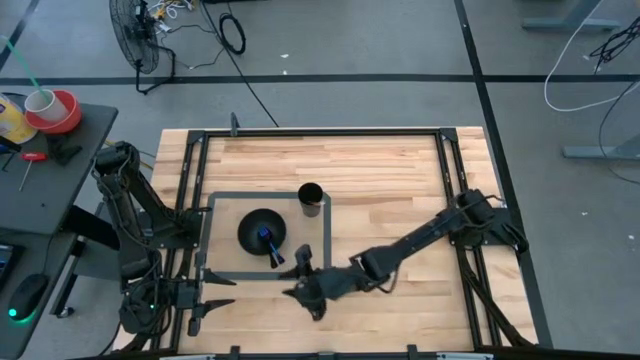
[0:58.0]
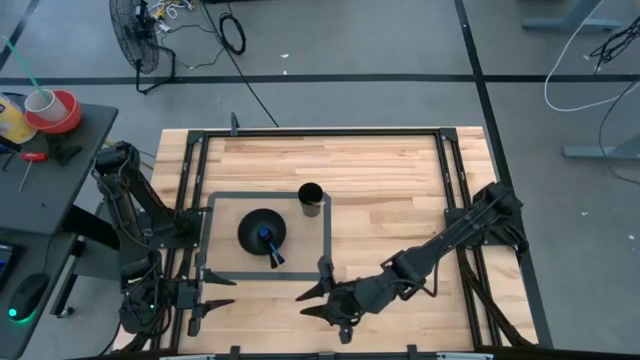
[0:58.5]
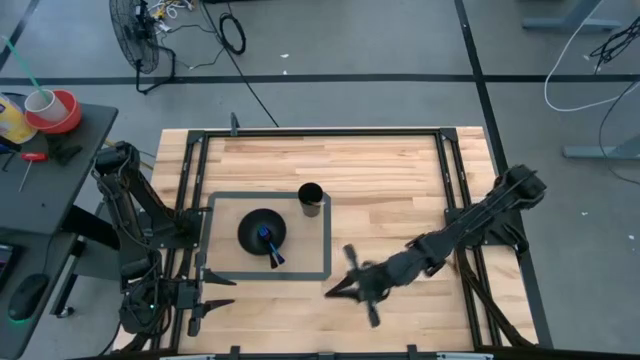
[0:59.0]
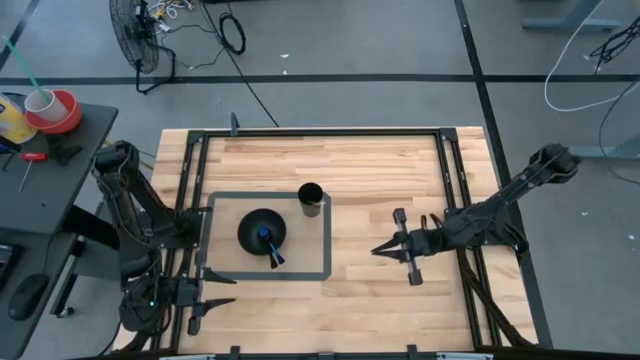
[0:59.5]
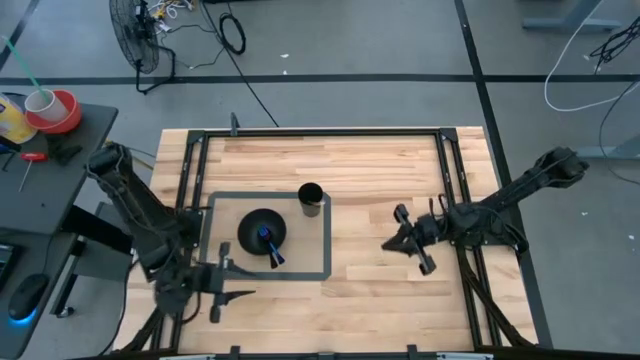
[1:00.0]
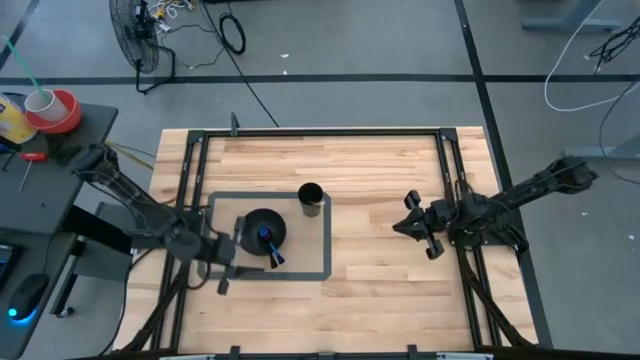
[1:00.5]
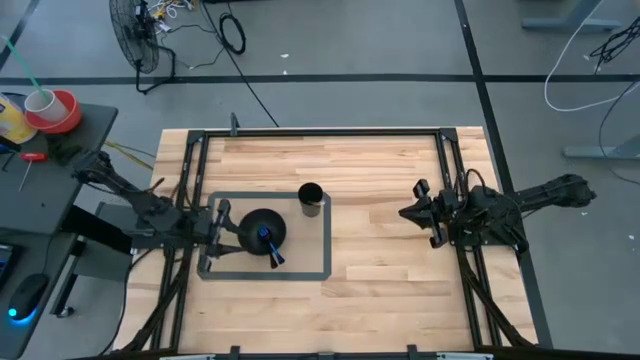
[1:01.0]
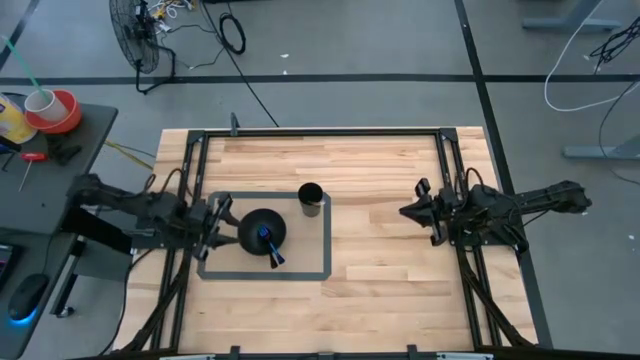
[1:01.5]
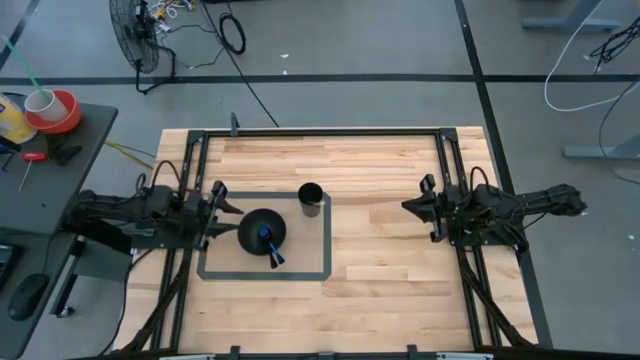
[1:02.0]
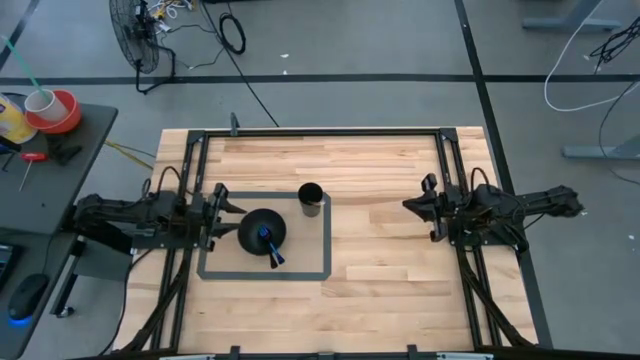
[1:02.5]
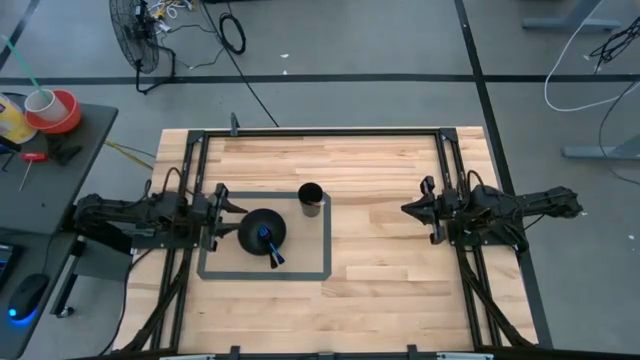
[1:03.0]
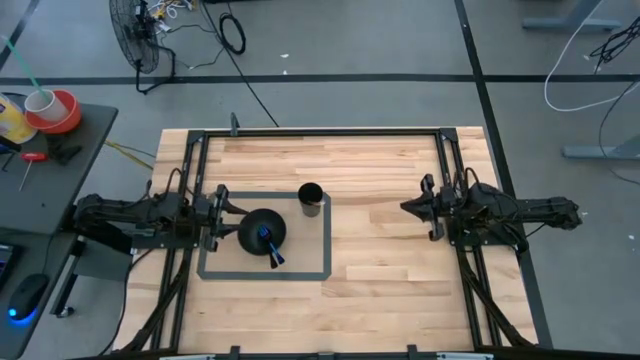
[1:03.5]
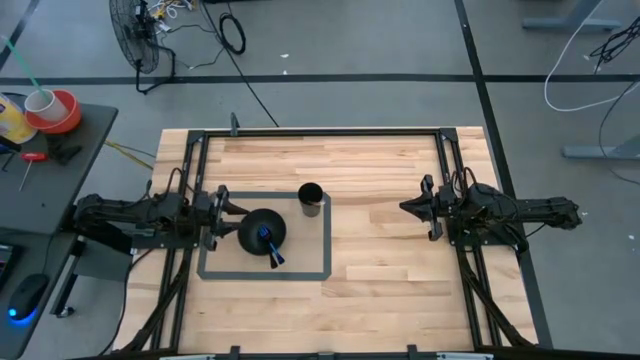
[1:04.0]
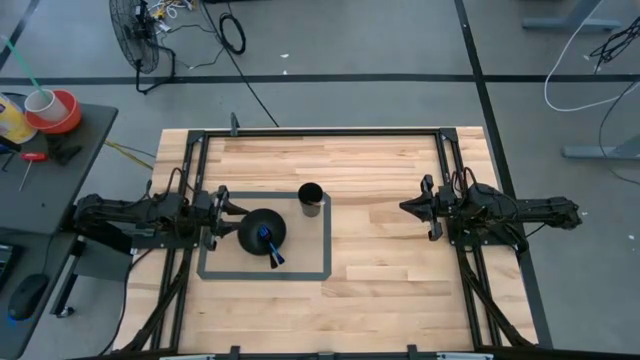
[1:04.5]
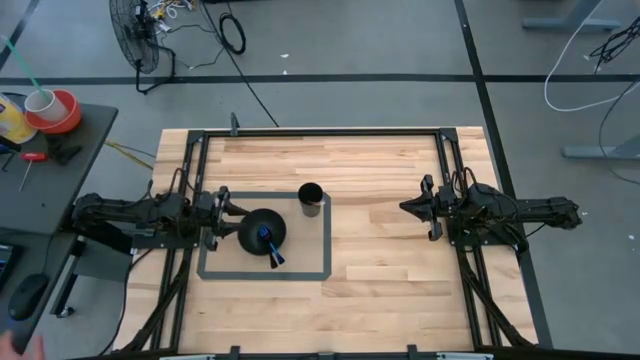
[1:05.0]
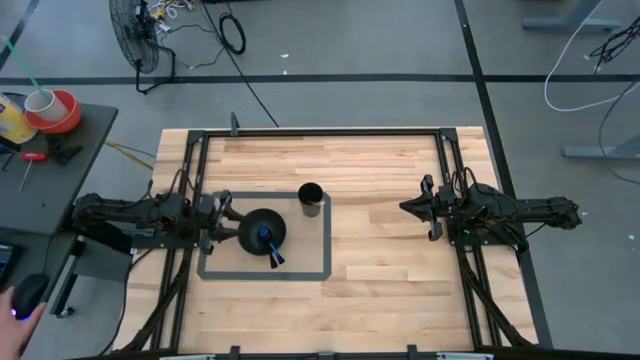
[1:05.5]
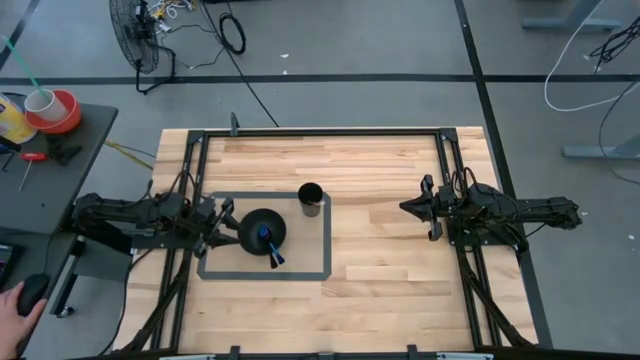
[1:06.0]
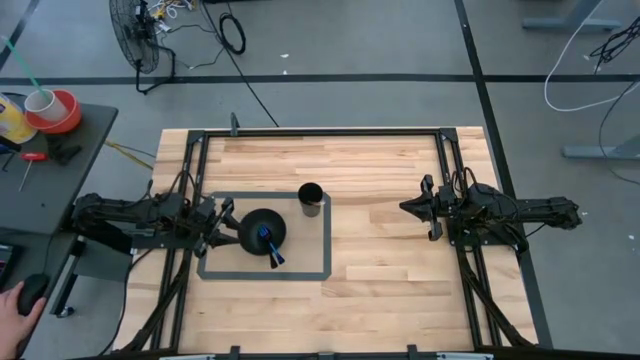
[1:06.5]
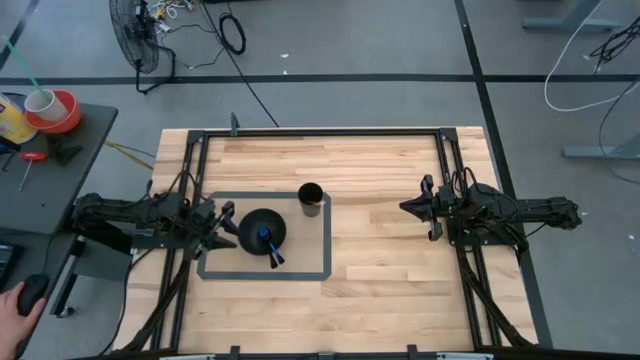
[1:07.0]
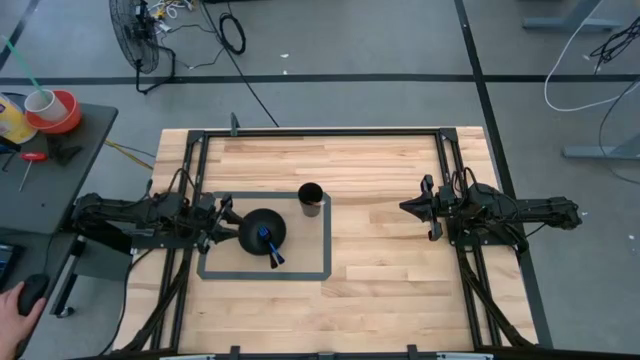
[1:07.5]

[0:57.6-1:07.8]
Task: Pick & Place Utensil
Return to Home Position

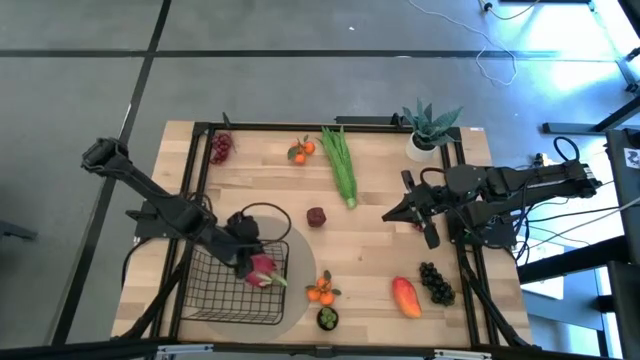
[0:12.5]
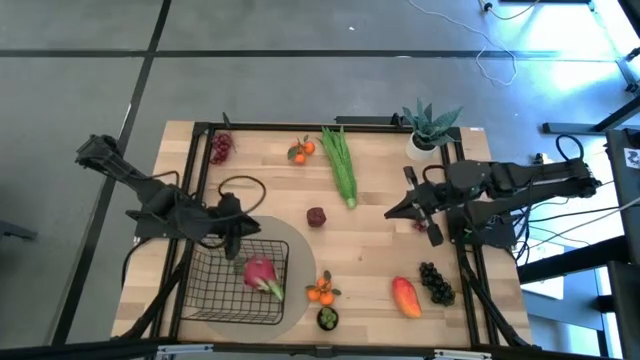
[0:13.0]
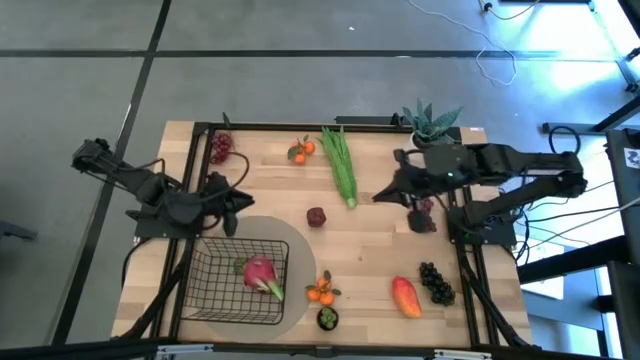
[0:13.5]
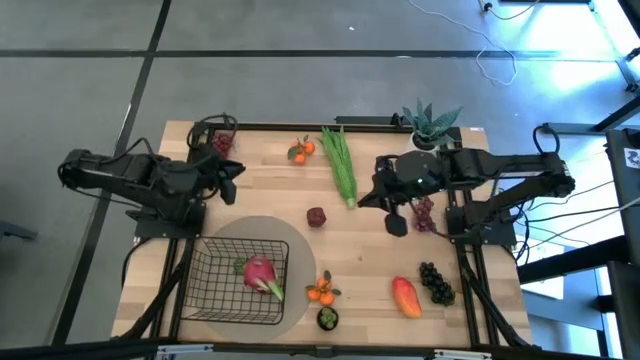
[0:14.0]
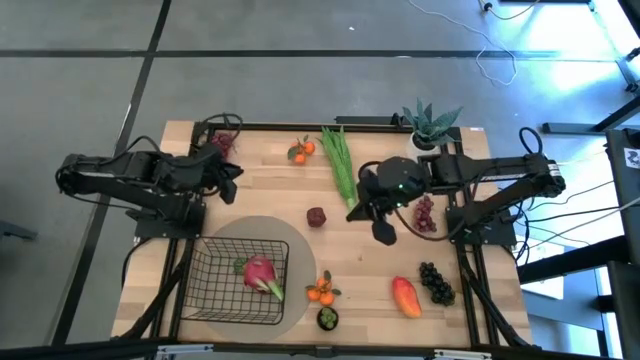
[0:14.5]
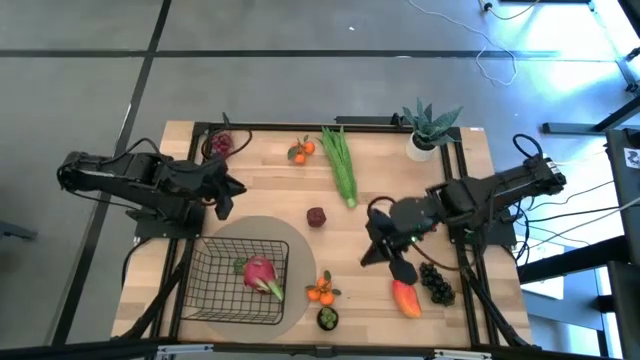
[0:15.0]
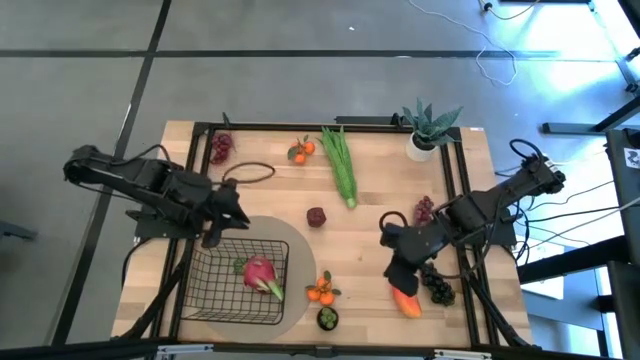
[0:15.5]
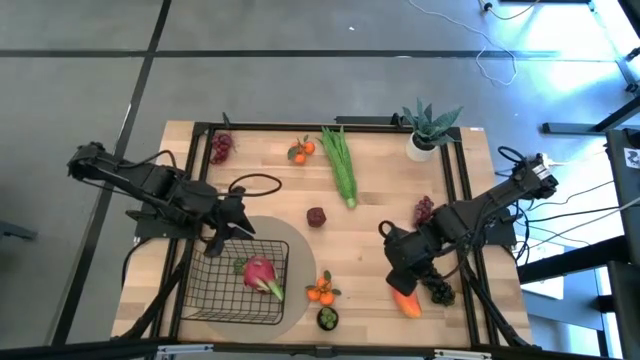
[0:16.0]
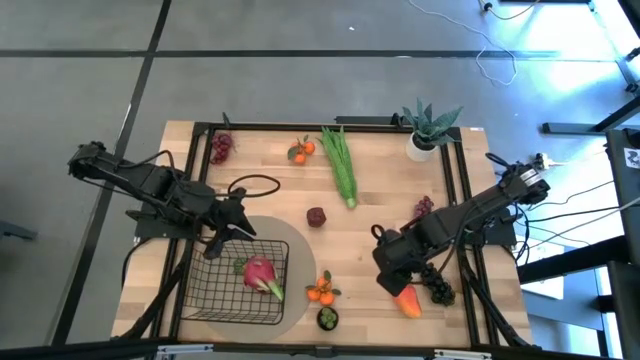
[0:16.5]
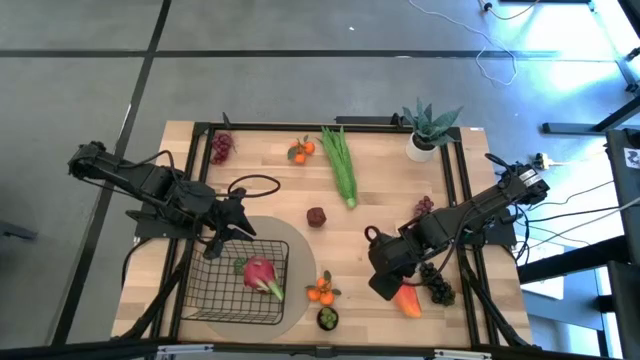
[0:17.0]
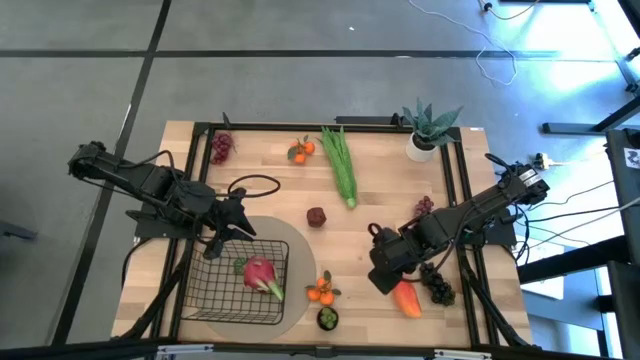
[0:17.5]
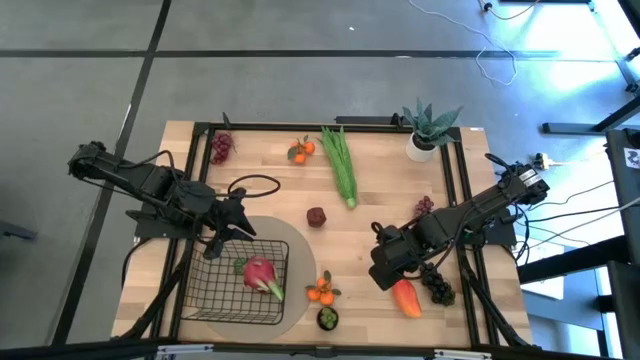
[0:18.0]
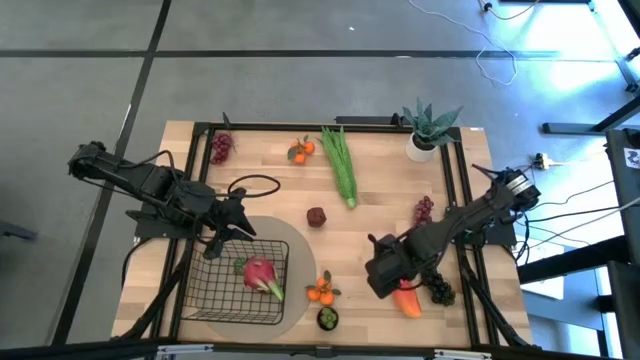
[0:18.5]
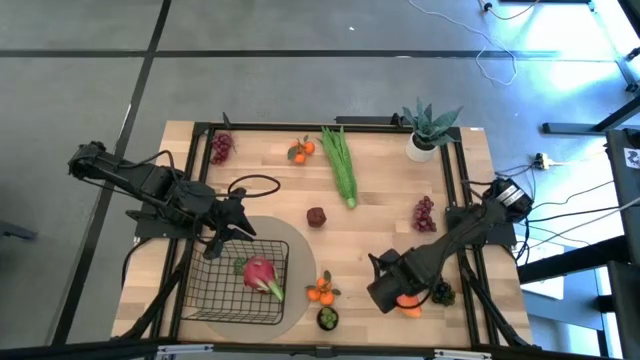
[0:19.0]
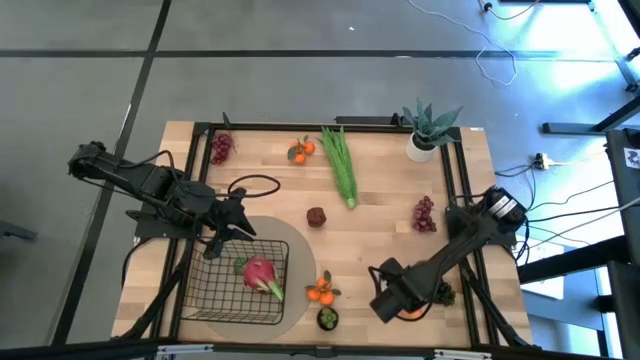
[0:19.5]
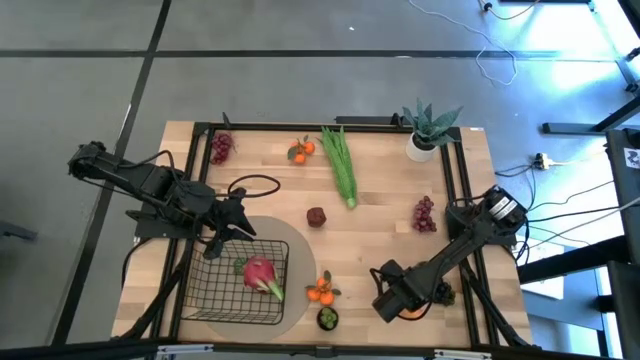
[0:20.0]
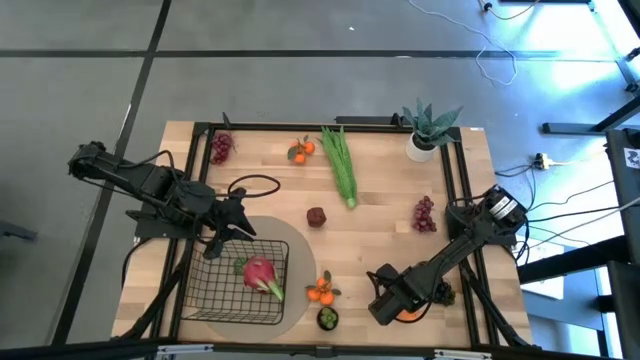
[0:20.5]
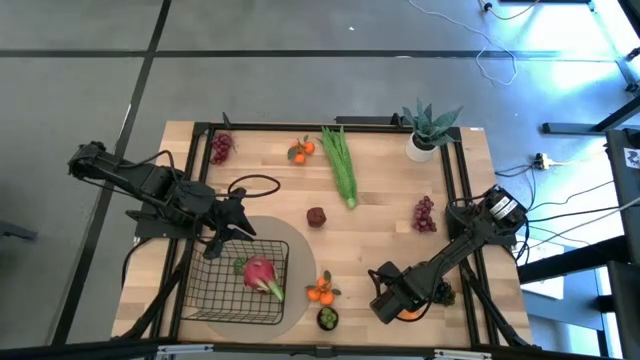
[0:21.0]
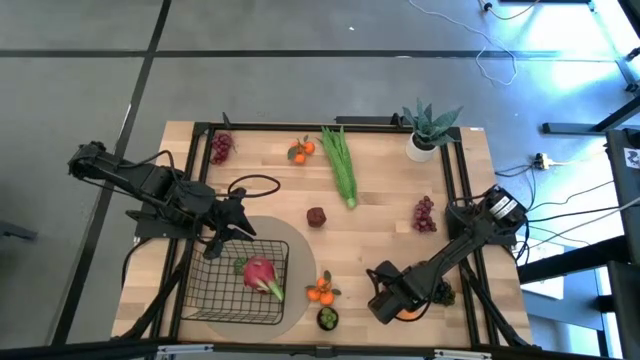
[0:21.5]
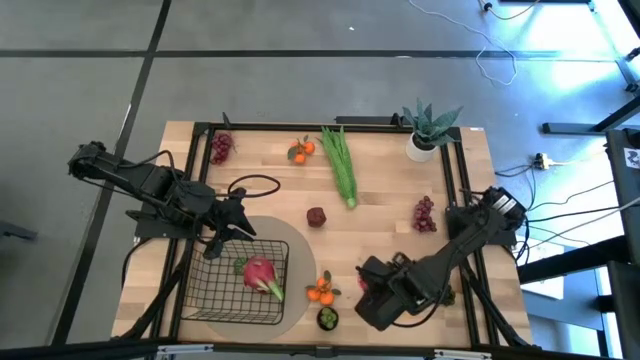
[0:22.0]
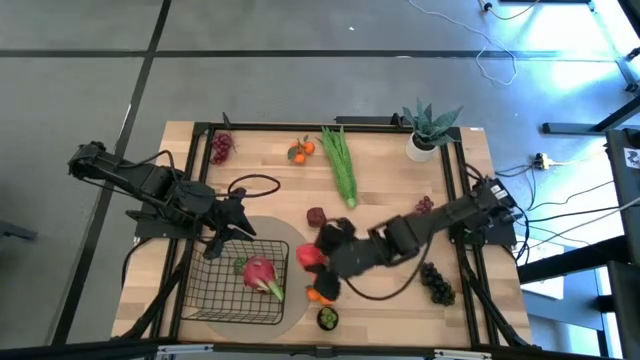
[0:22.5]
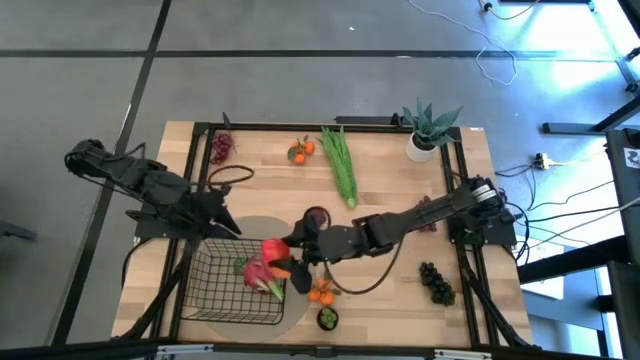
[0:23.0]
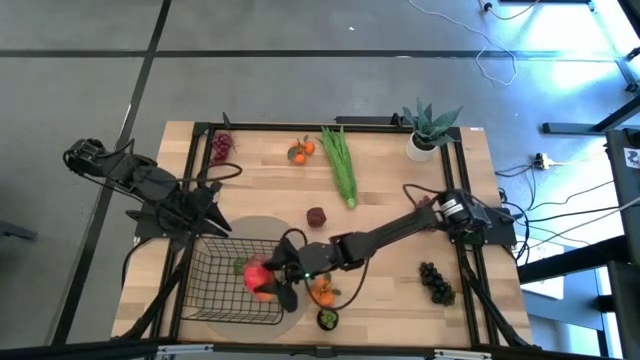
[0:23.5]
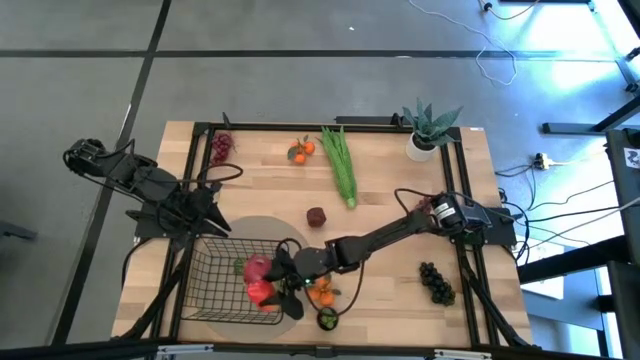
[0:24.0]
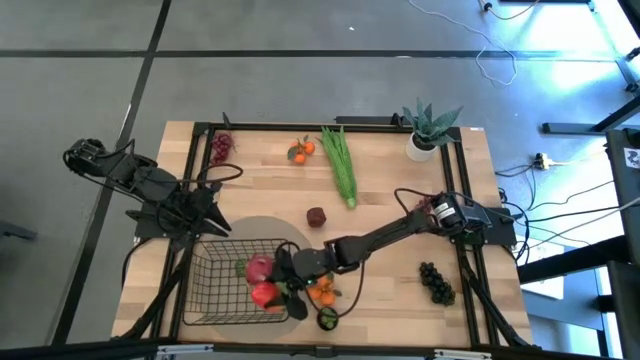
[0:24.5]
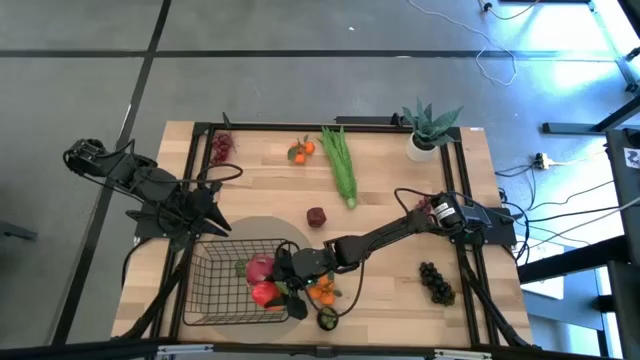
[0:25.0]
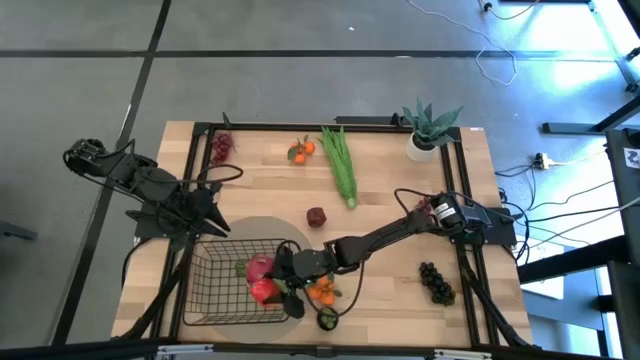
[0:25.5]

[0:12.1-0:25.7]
Task: Build produce basket
Put the red mango into the black wire basket
